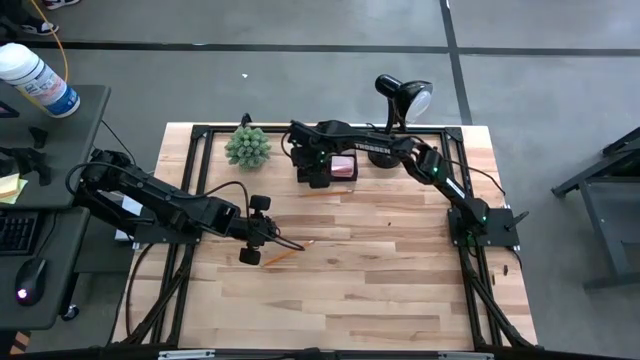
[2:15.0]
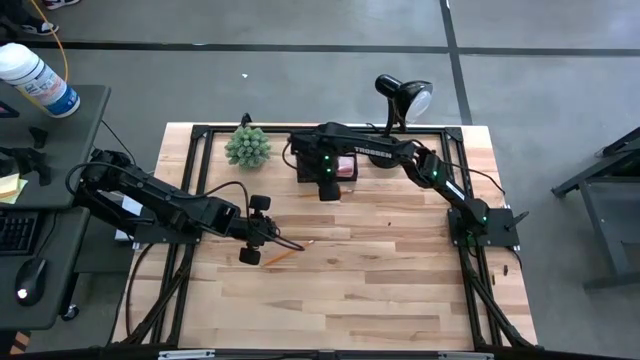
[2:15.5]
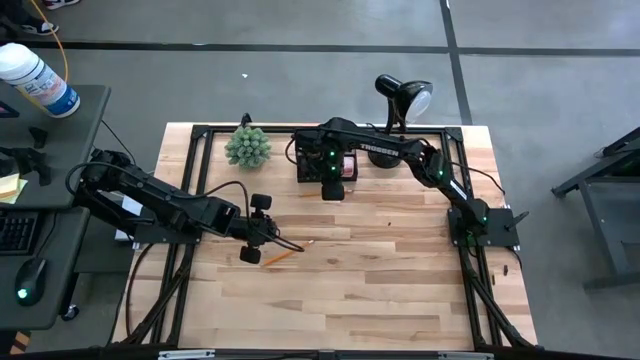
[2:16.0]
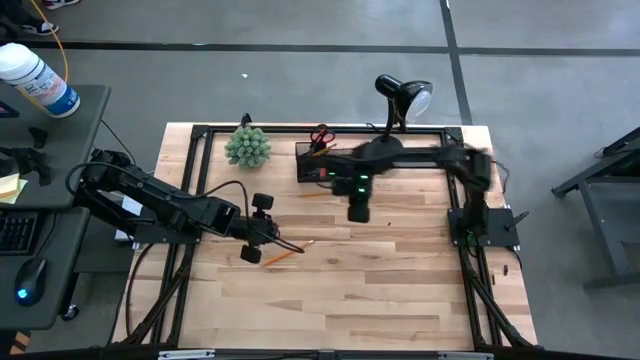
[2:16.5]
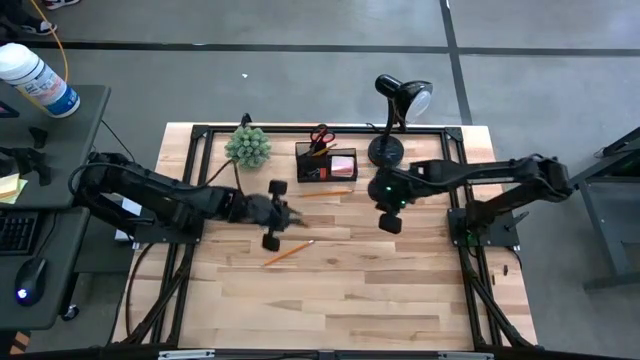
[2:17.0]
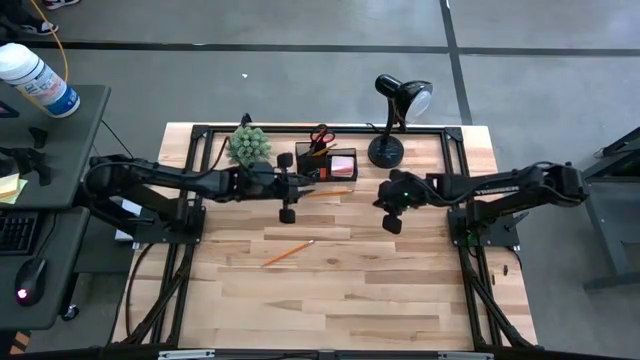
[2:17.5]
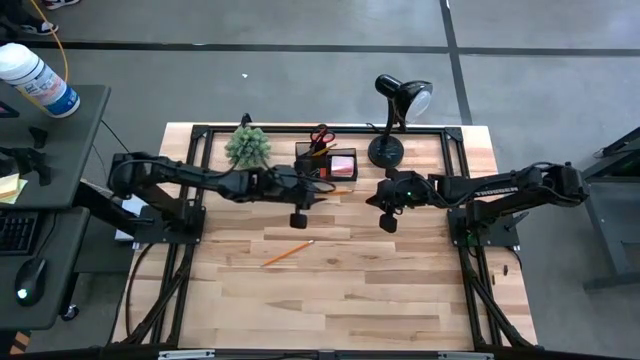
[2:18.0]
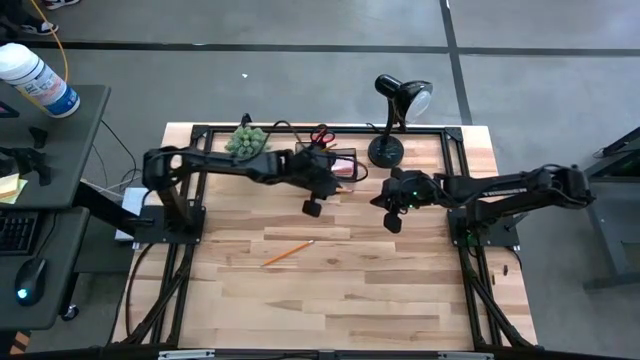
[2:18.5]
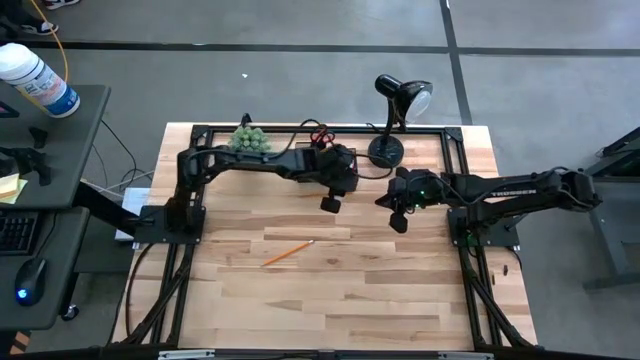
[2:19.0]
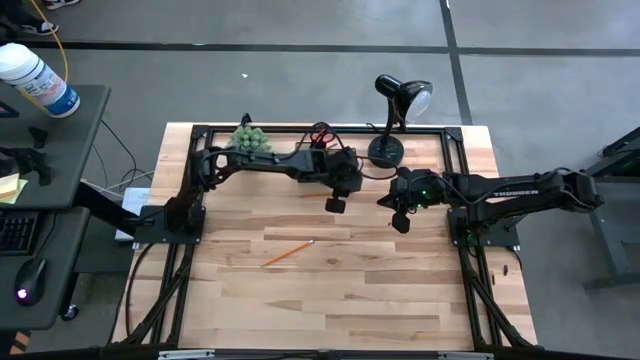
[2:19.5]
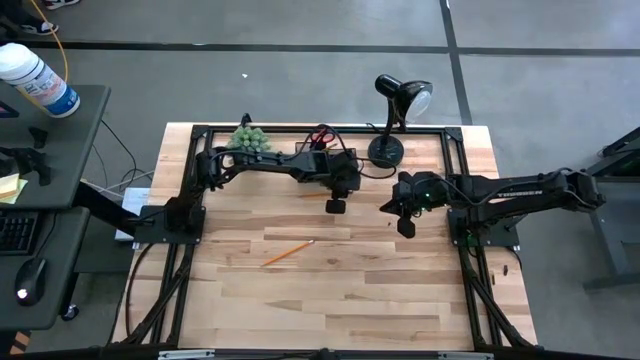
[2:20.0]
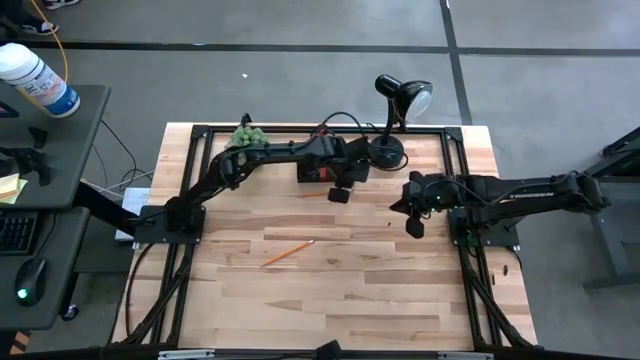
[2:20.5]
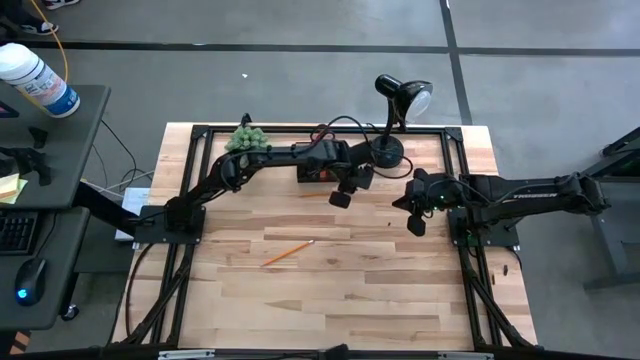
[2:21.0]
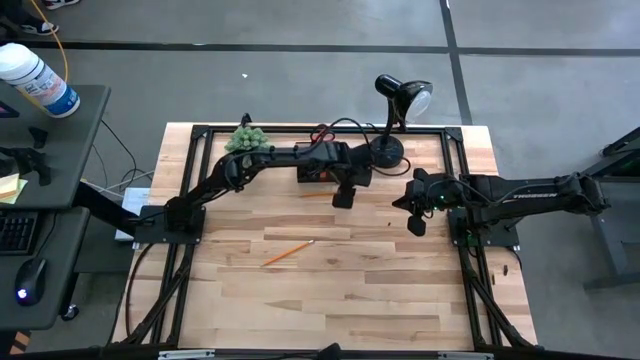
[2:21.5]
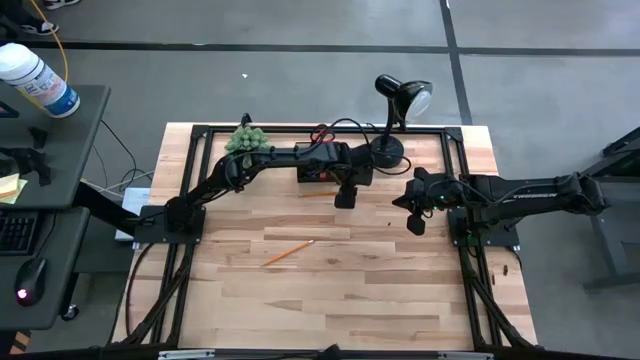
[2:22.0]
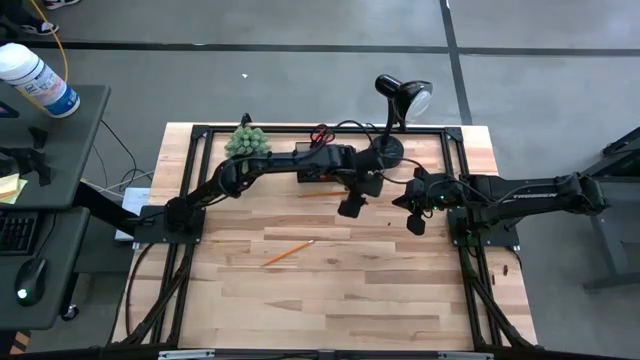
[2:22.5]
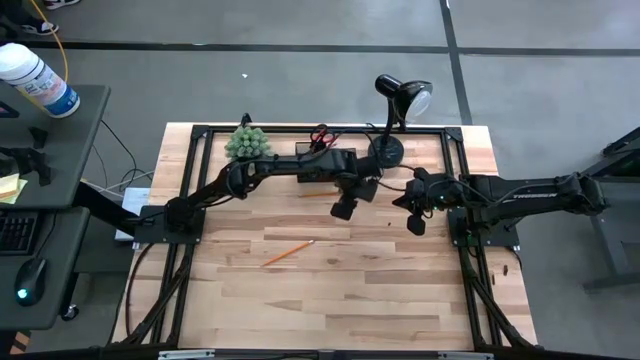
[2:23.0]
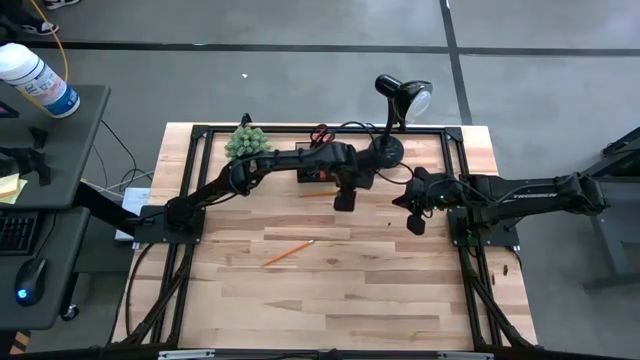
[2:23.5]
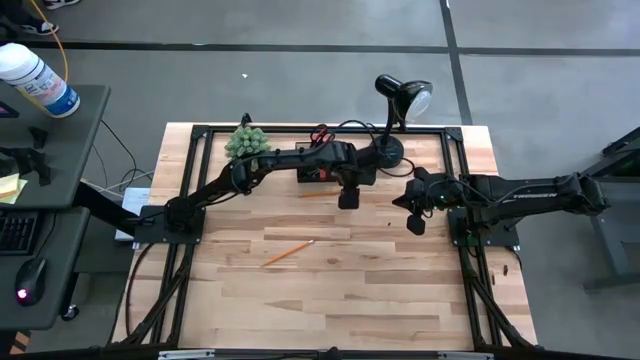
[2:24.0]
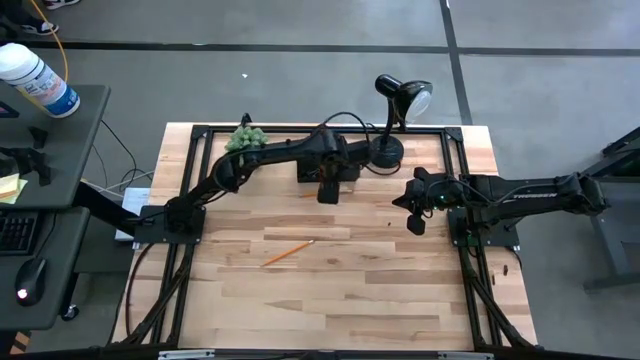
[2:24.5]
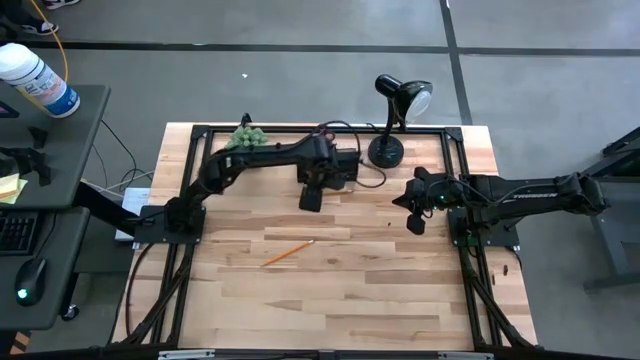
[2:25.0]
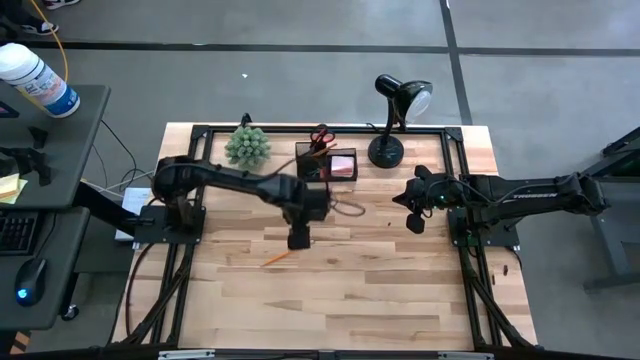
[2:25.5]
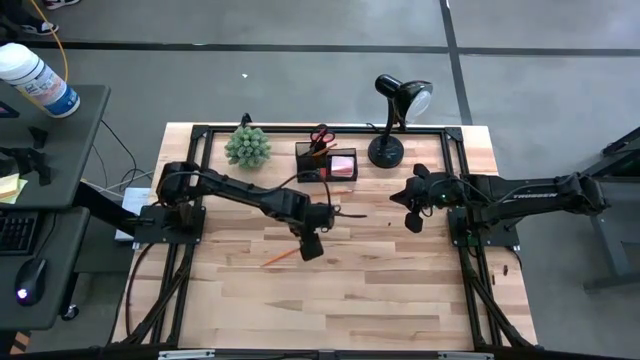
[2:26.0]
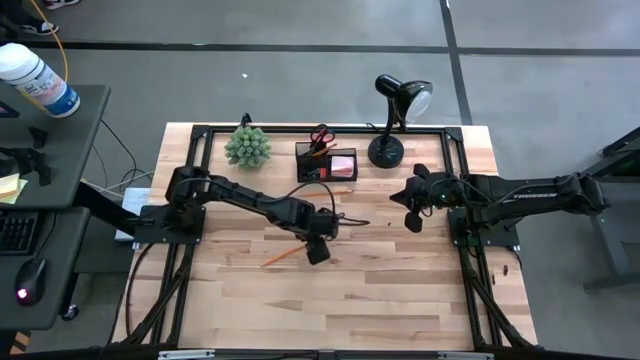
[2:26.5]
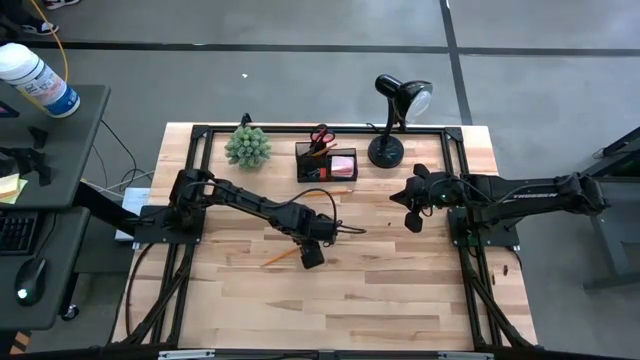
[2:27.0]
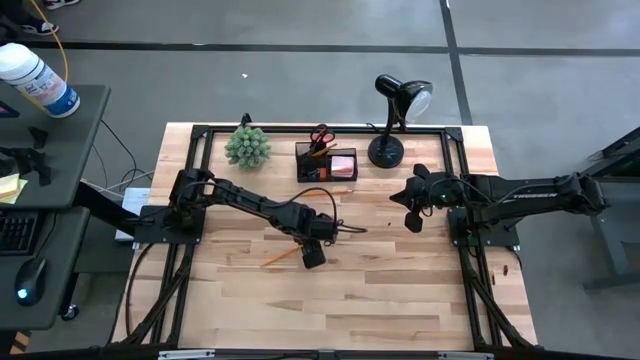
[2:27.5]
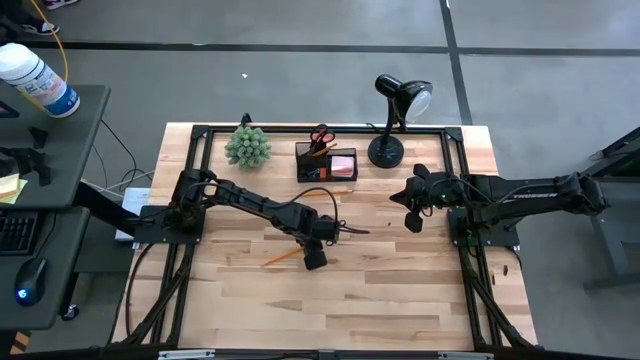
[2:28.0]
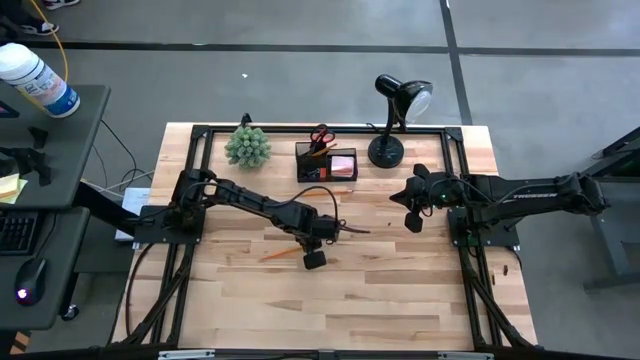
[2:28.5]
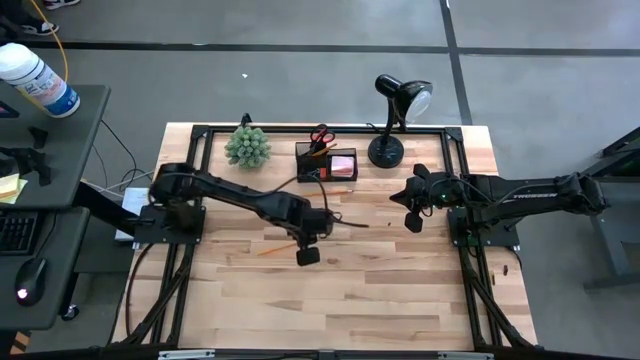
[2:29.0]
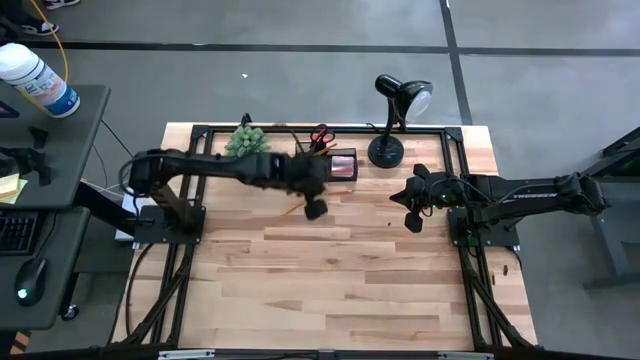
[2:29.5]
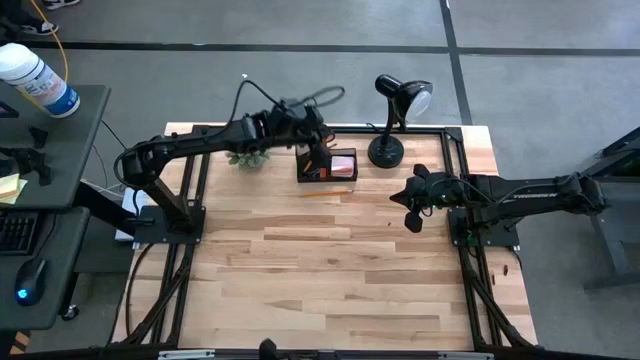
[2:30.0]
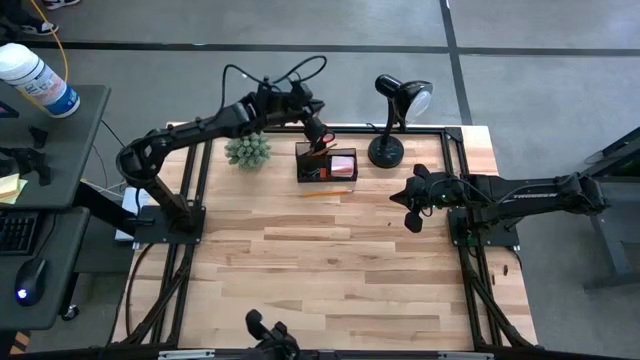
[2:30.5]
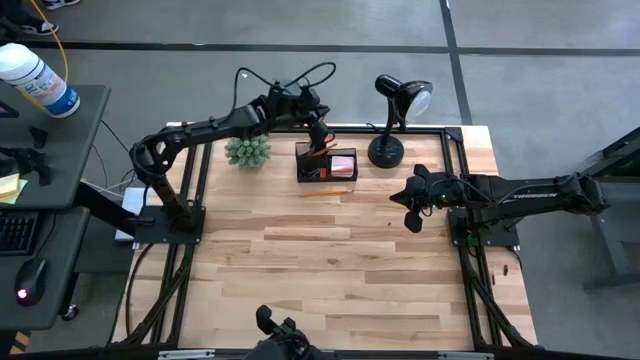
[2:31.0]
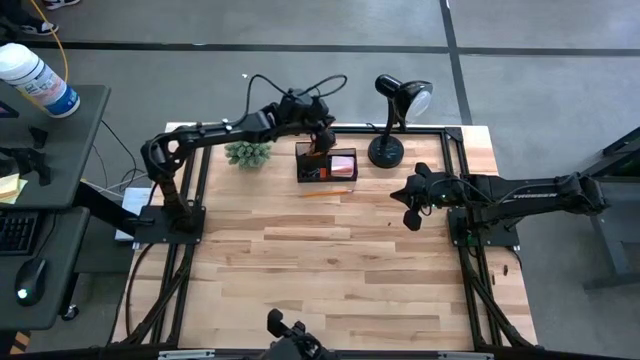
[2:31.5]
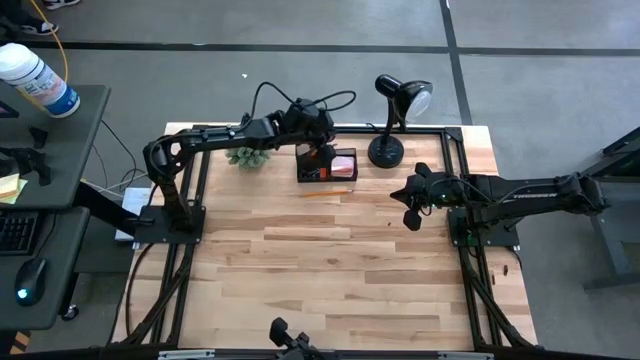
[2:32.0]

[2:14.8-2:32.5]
Task: Pick and place office supplies into organizer
Put the bottom yellow pencil into the black desk organizer

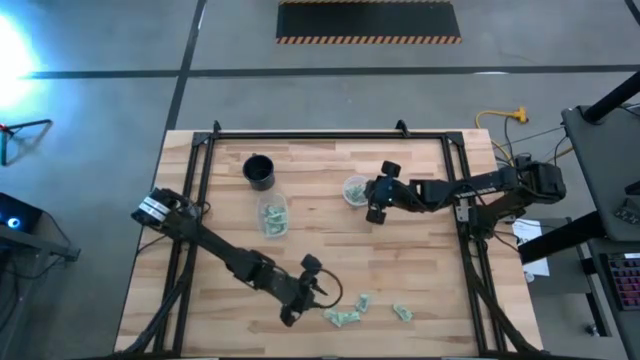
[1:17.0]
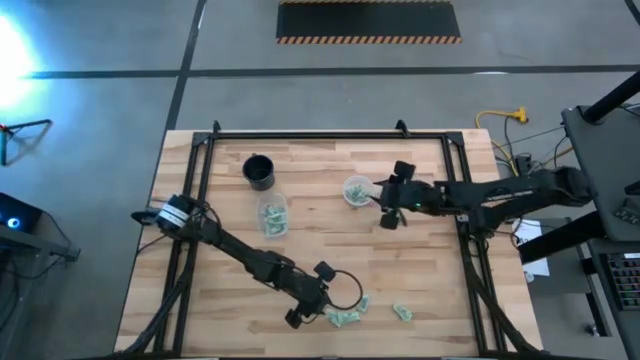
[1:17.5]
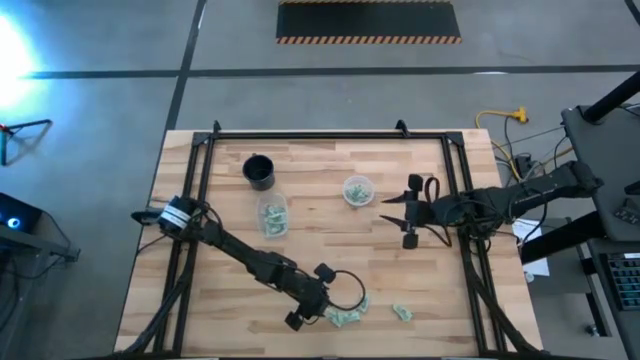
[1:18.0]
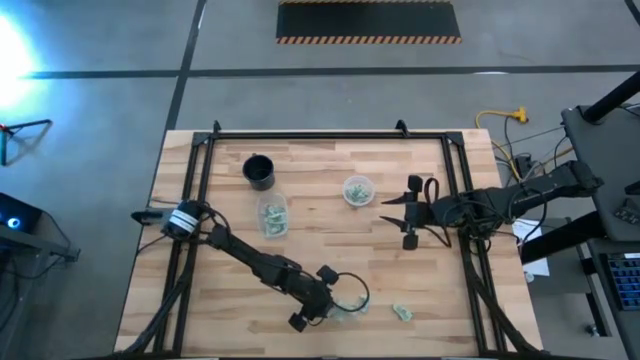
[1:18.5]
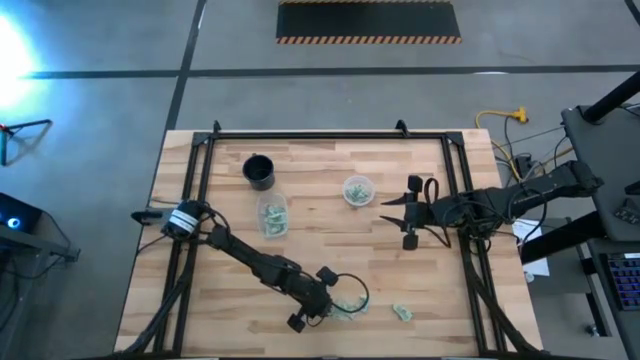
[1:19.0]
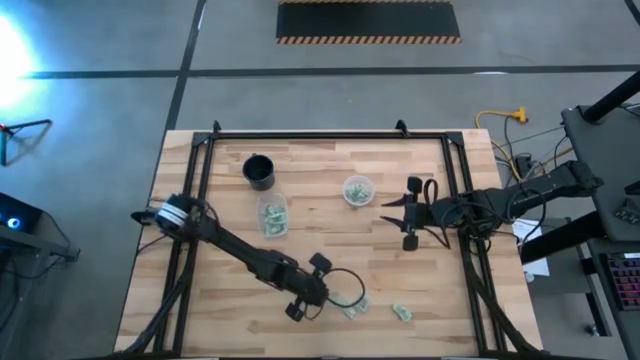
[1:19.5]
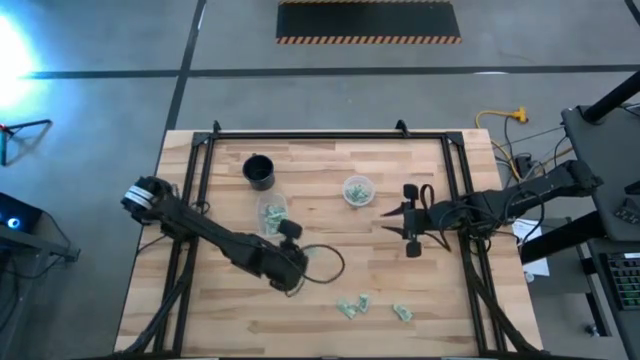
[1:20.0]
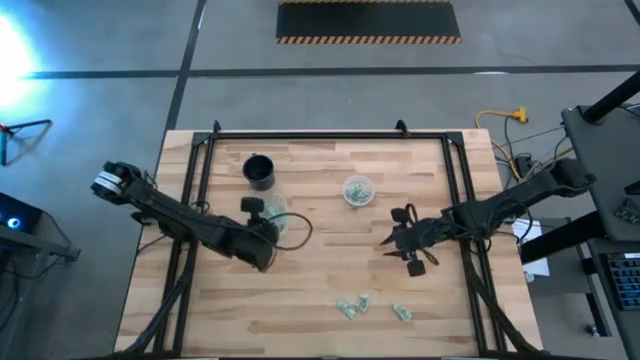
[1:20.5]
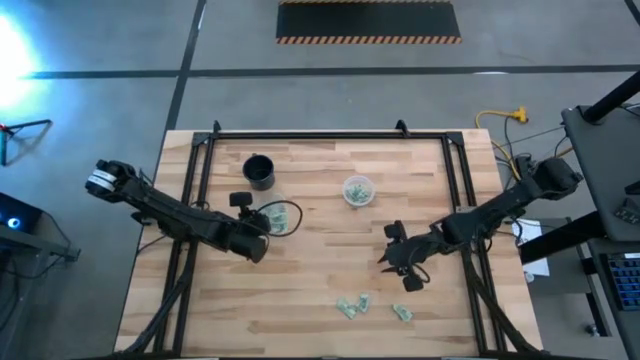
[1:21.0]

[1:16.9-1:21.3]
Task: Pick and place items into bin
Put the stevia packet into the left transparent bin
